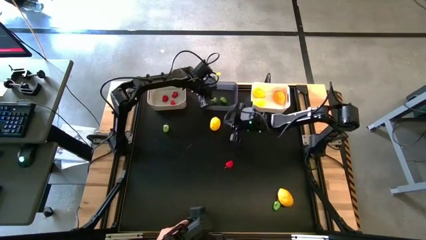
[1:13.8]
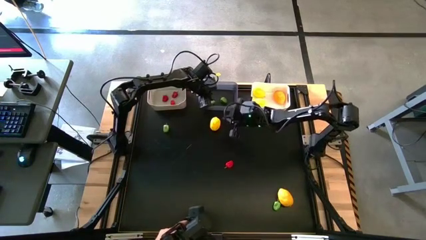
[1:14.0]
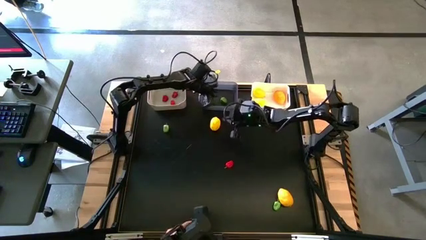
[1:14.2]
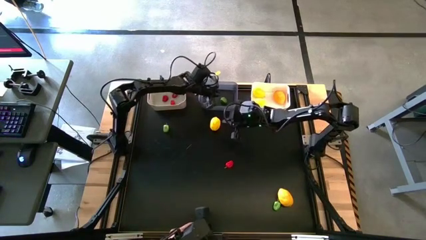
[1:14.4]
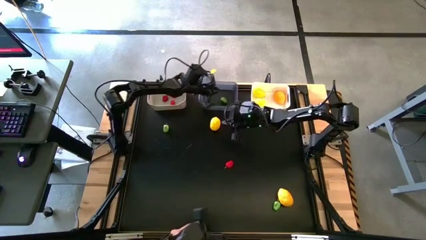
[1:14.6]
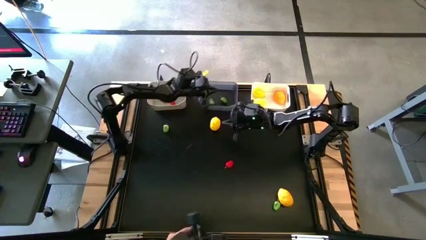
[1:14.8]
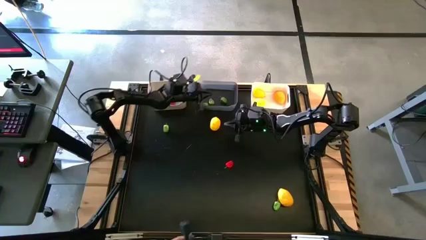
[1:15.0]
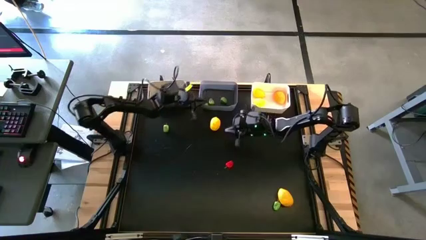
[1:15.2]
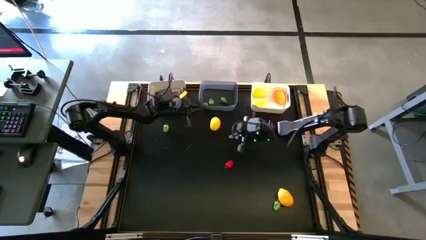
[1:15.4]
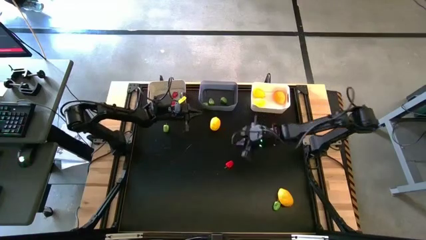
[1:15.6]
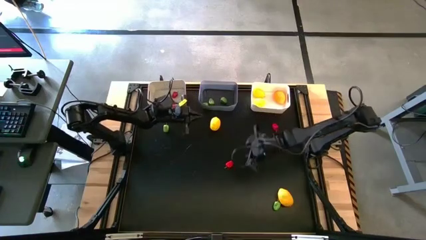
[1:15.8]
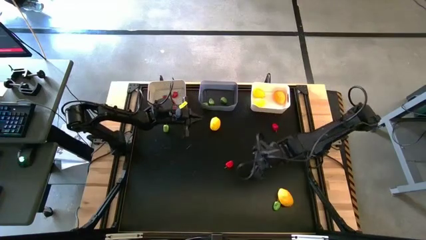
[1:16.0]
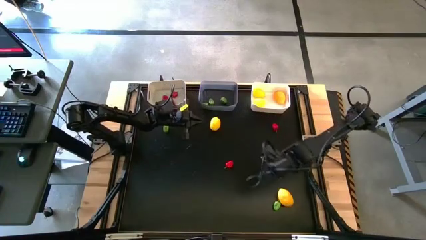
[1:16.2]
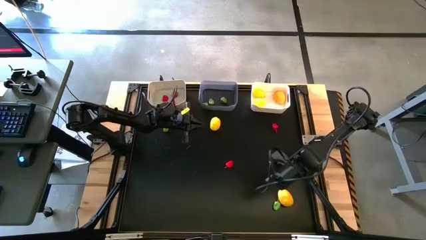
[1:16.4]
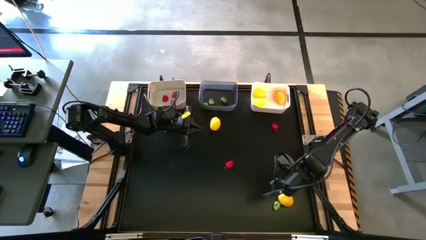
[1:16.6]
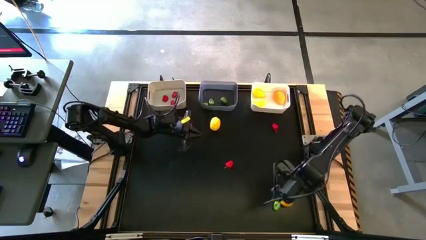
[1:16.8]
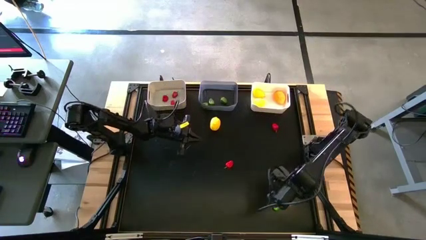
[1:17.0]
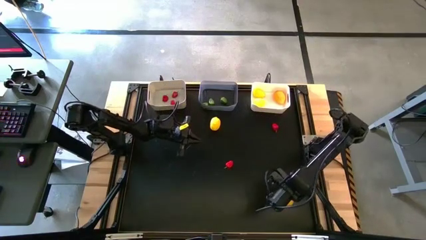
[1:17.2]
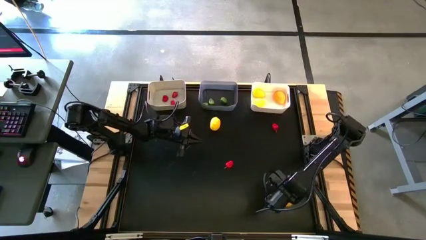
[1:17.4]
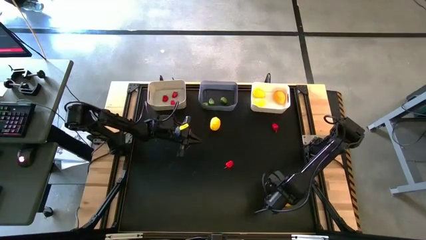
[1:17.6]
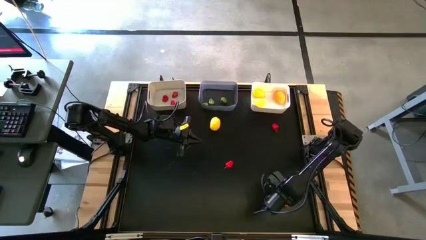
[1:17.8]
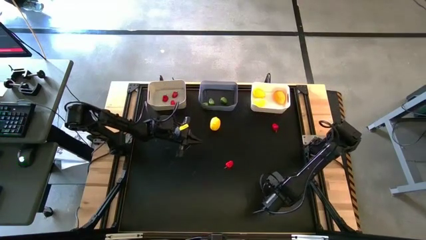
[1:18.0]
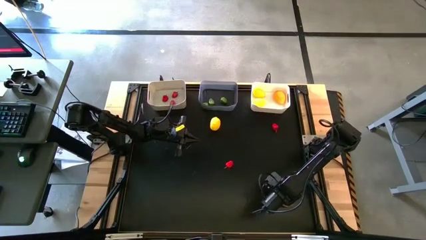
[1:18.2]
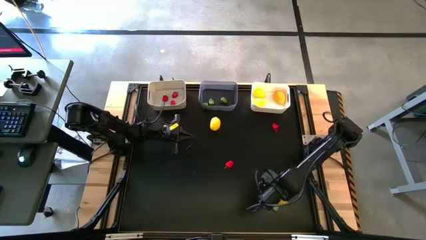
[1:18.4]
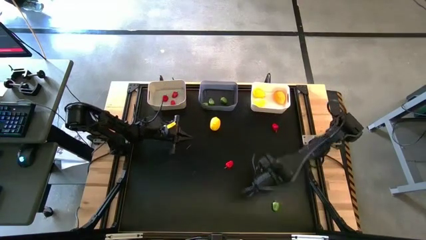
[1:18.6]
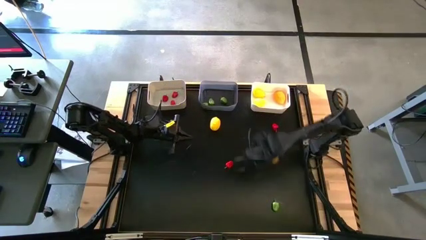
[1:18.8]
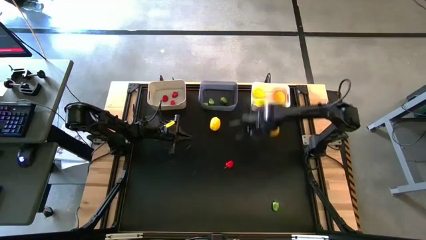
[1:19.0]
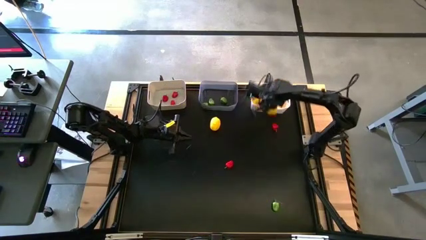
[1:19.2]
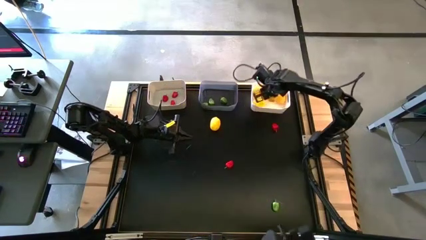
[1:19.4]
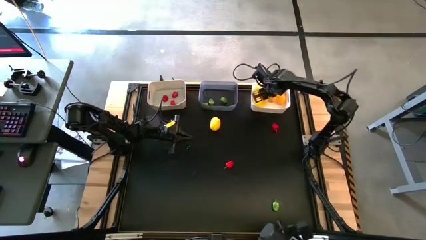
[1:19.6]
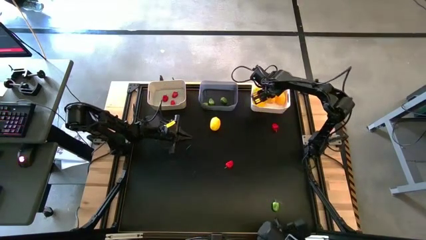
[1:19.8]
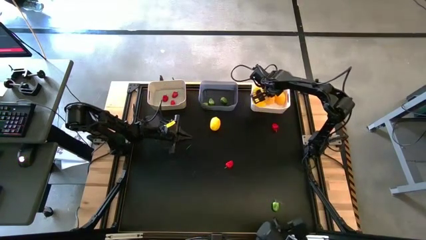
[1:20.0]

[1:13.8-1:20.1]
Task: Sort produce into baskets
Put the lemon into the white bin

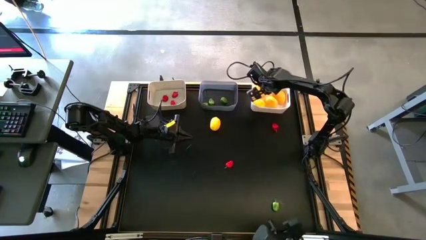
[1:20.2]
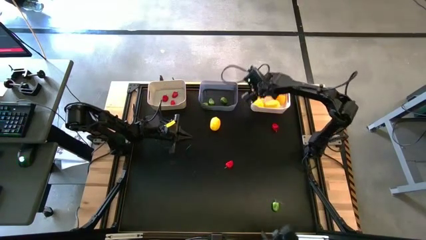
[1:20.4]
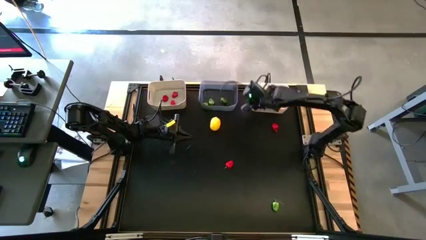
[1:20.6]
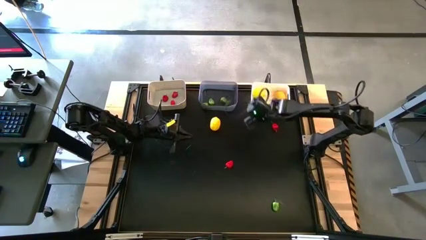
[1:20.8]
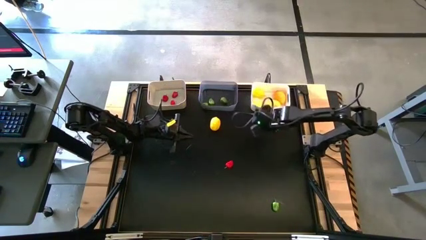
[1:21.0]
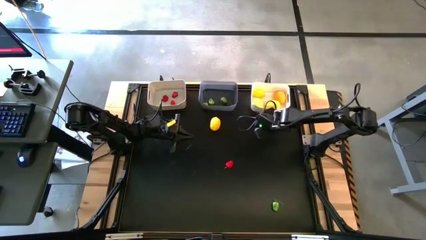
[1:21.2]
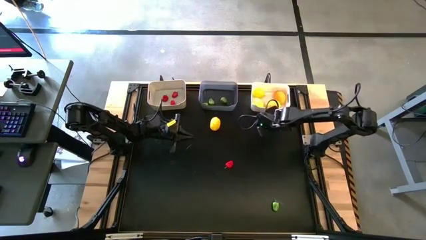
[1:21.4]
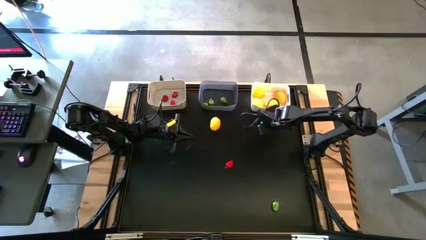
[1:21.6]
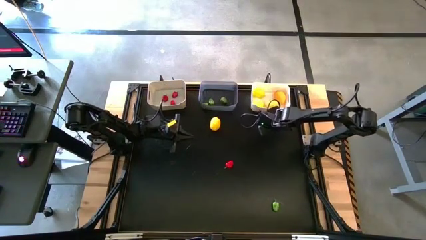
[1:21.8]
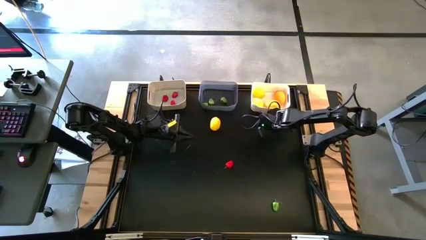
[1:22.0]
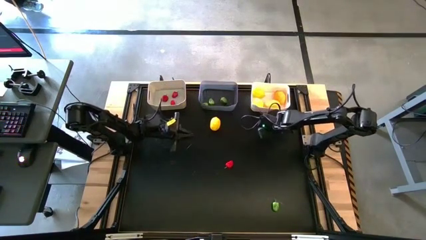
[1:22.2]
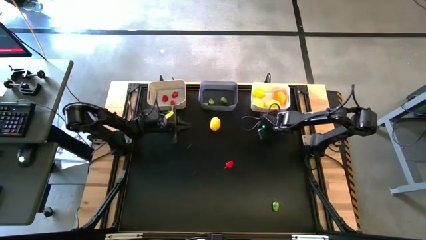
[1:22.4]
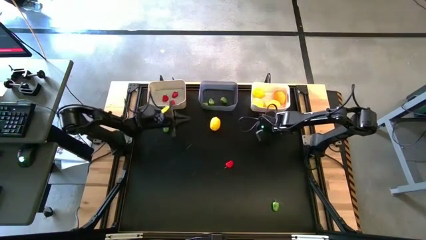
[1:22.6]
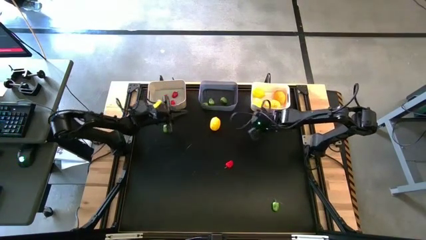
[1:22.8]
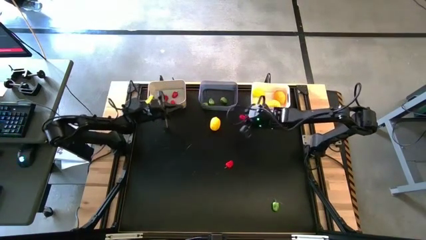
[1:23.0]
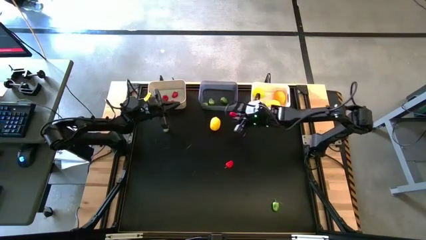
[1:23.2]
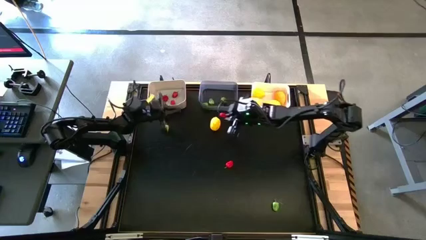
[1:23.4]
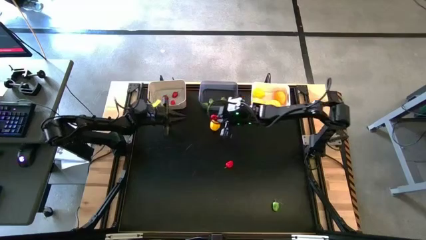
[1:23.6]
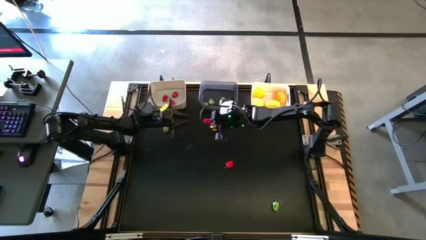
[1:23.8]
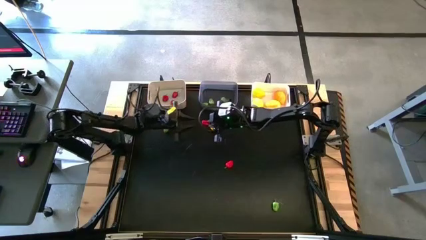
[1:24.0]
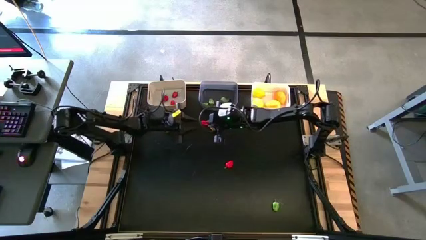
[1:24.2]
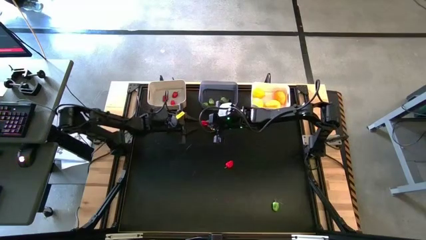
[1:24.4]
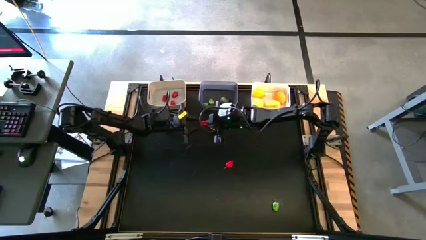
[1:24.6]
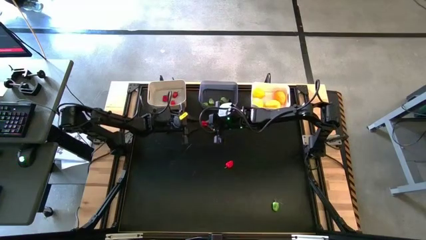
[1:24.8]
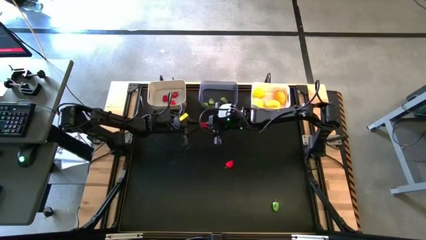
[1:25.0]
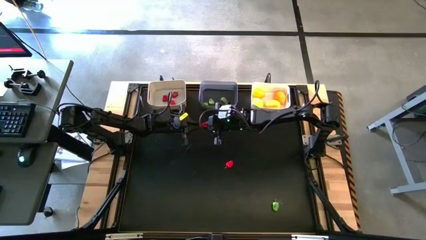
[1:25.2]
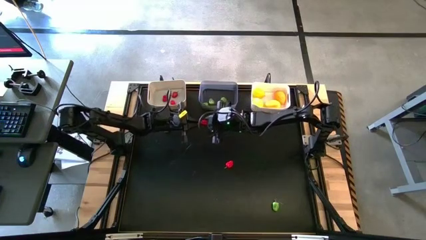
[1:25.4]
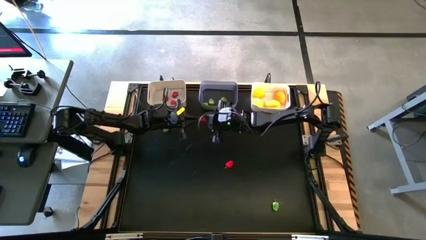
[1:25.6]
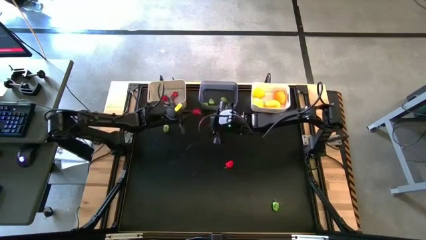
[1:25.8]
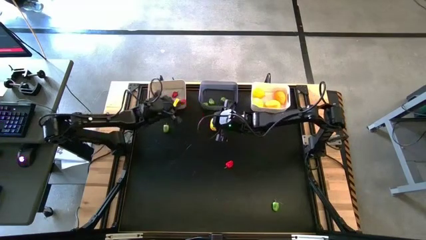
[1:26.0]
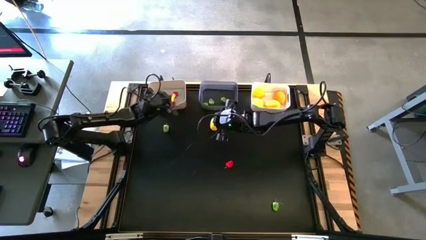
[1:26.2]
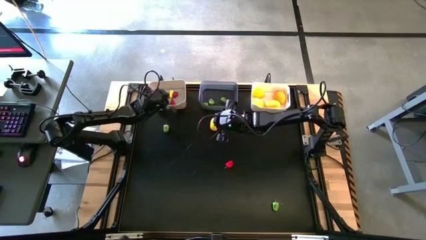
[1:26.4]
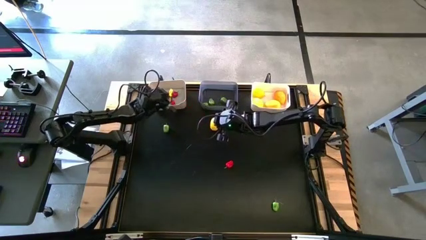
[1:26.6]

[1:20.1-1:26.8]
Put the red bell pepper into the gray bin

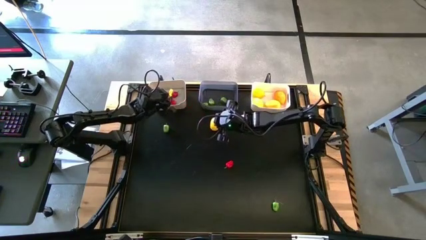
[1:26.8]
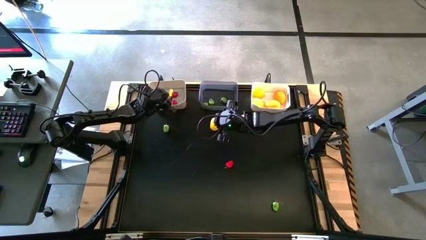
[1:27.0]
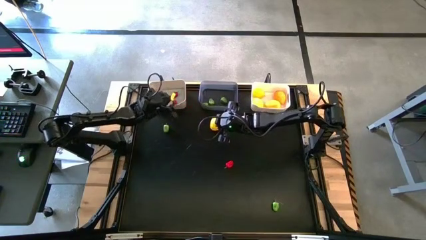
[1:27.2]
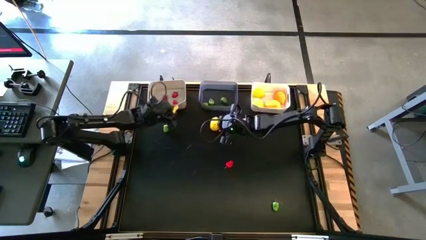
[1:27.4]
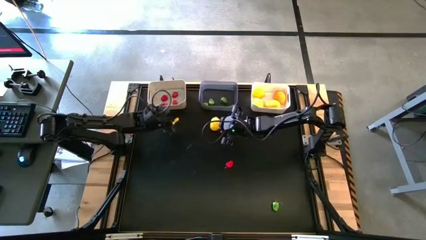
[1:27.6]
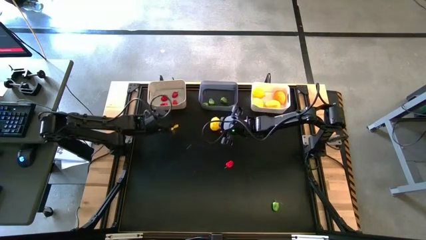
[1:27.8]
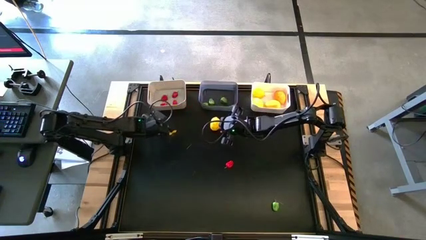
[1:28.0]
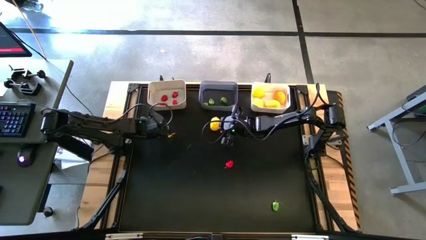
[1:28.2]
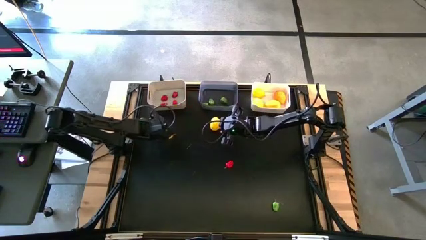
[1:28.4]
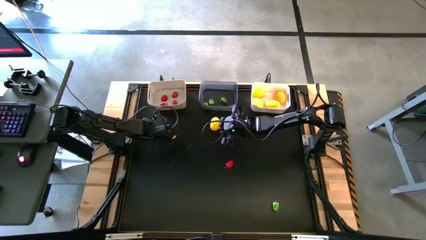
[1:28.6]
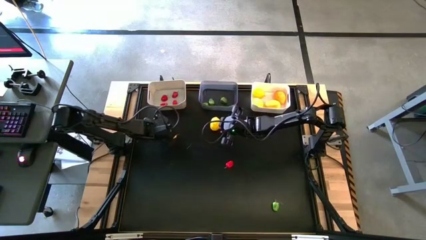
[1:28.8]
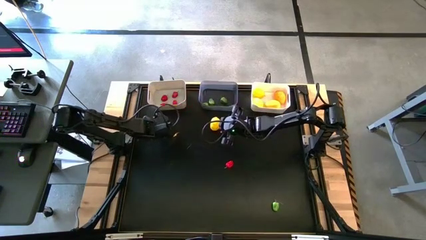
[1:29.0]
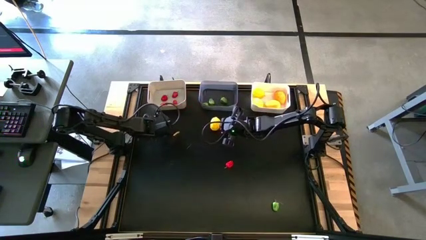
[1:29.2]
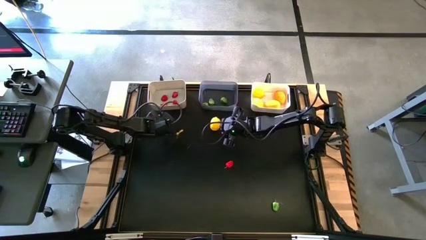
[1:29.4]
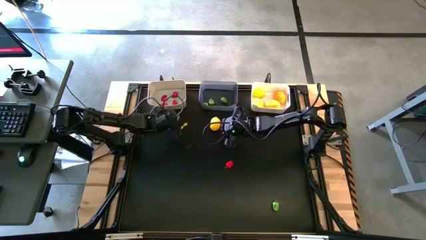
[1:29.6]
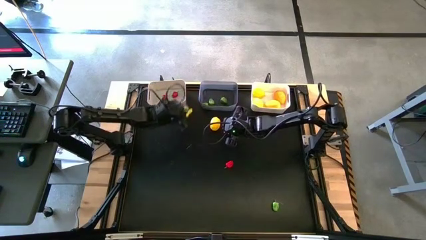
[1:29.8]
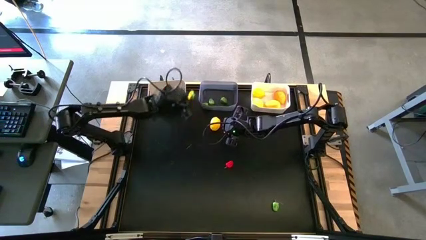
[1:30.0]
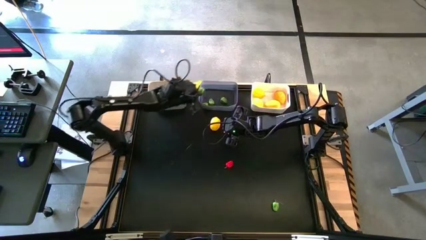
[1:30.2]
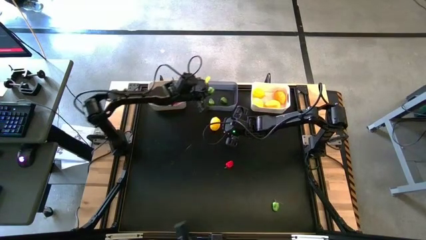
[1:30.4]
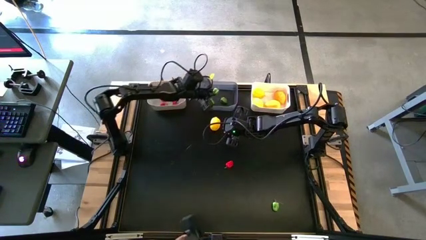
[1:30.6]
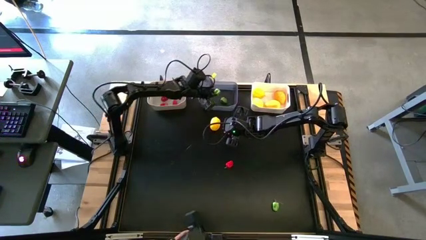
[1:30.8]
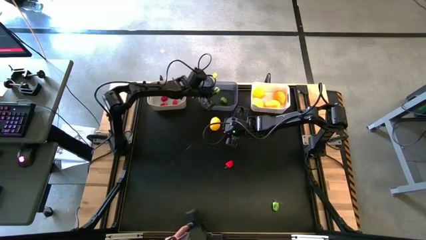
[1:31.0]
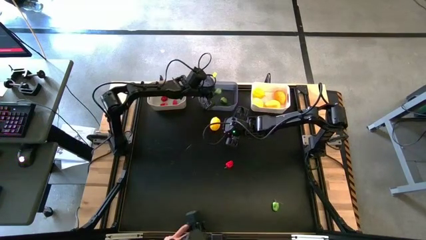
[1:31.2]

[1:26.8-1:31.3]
Put the bell pepper into the transparent bin
